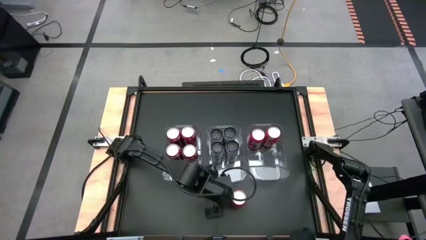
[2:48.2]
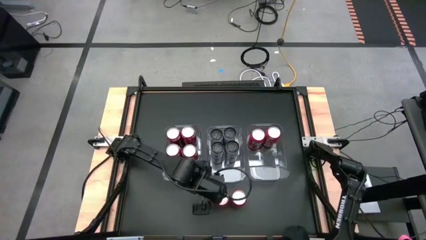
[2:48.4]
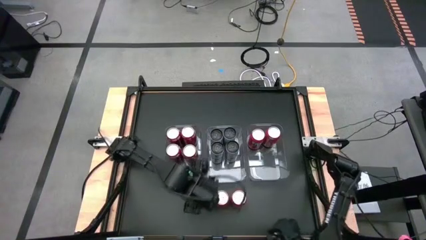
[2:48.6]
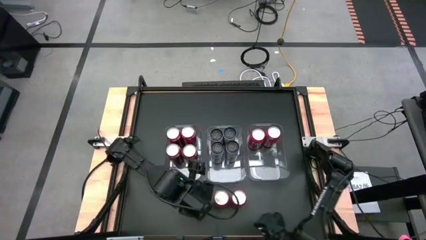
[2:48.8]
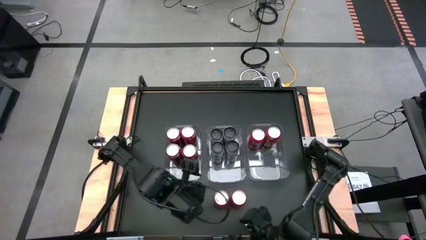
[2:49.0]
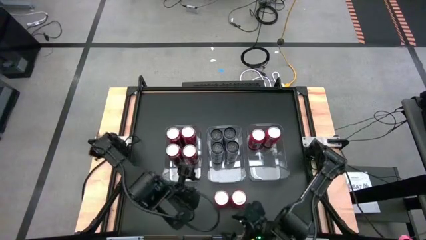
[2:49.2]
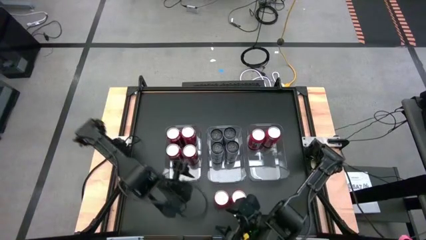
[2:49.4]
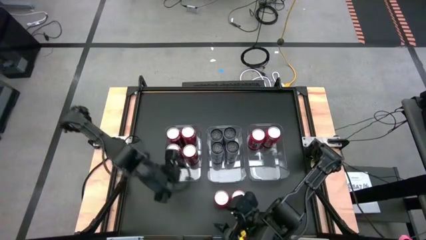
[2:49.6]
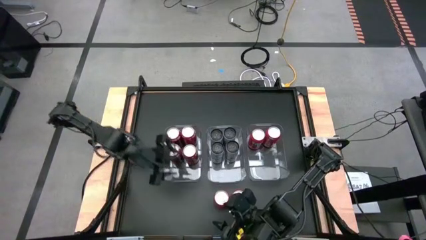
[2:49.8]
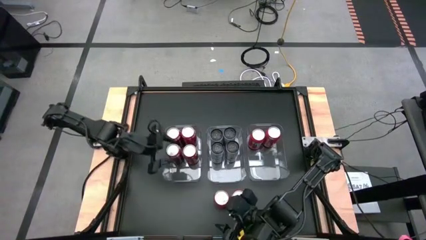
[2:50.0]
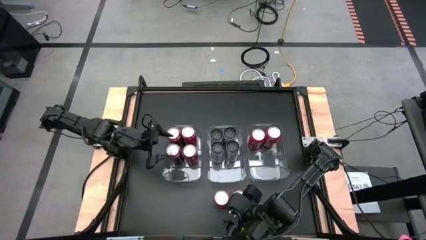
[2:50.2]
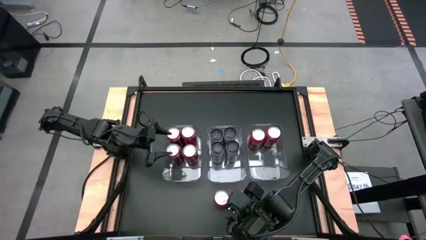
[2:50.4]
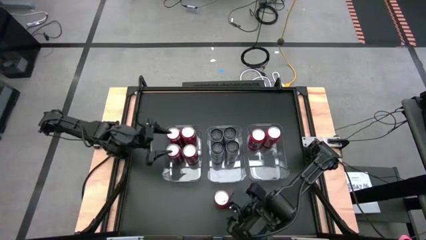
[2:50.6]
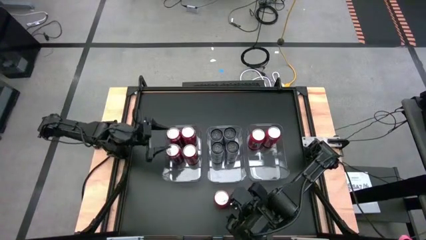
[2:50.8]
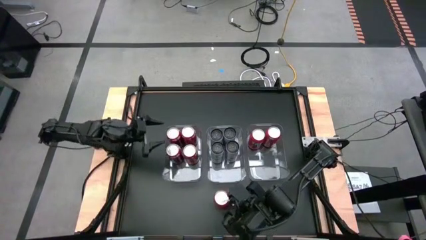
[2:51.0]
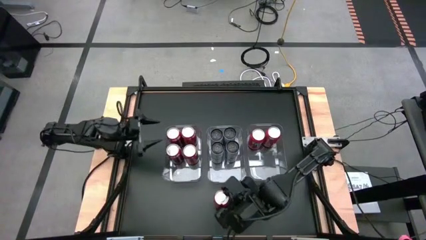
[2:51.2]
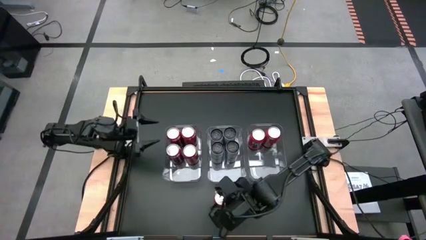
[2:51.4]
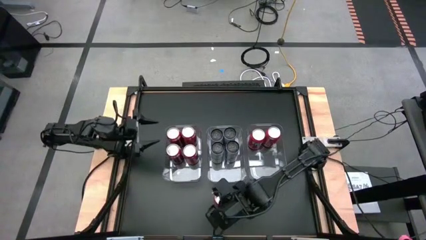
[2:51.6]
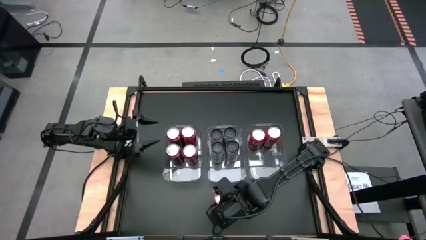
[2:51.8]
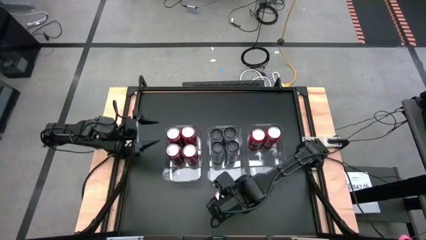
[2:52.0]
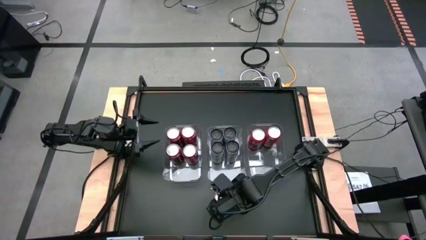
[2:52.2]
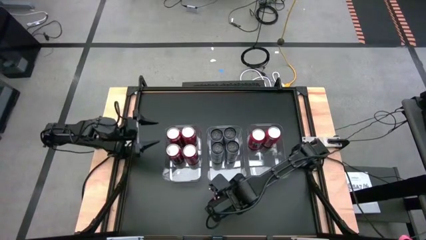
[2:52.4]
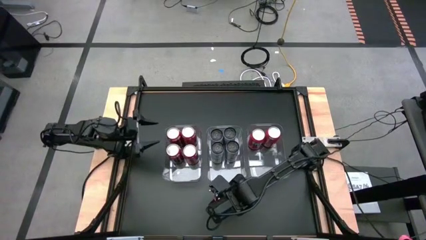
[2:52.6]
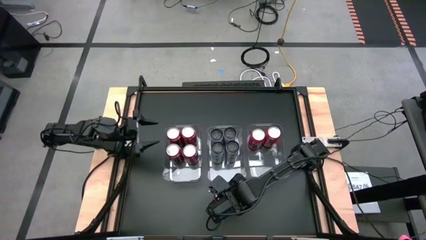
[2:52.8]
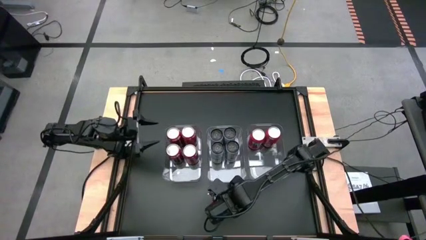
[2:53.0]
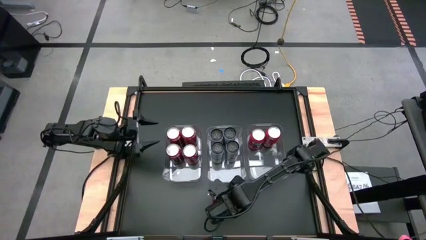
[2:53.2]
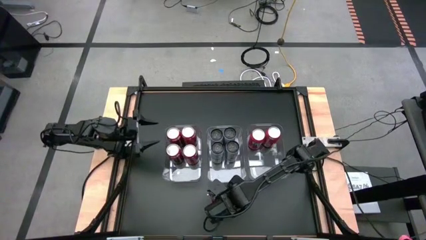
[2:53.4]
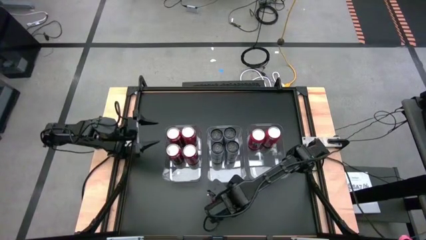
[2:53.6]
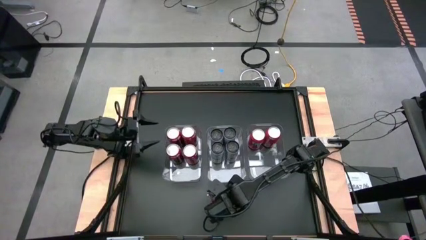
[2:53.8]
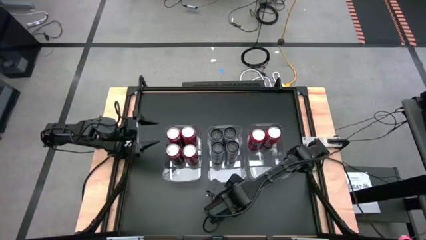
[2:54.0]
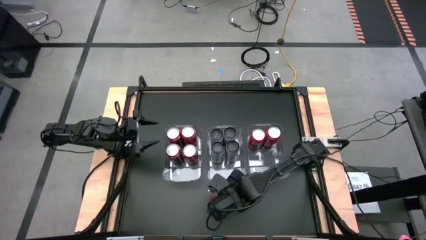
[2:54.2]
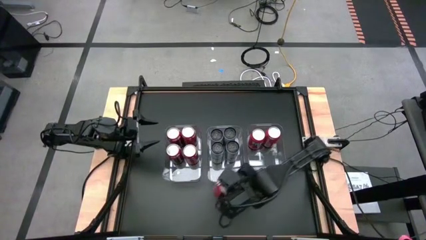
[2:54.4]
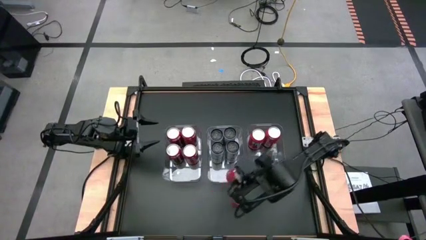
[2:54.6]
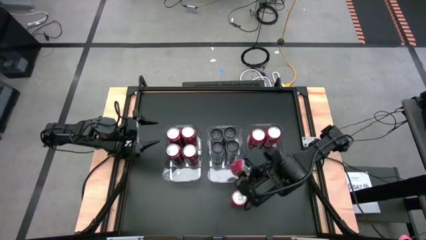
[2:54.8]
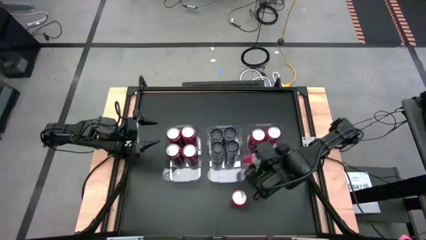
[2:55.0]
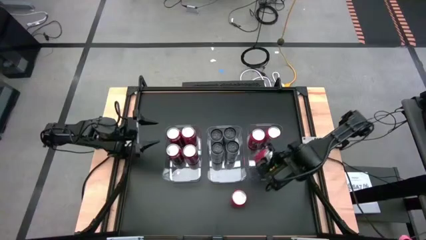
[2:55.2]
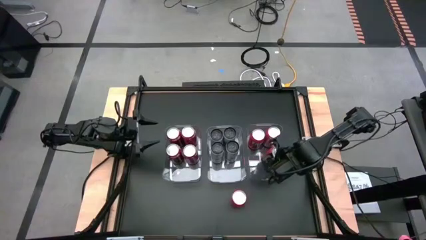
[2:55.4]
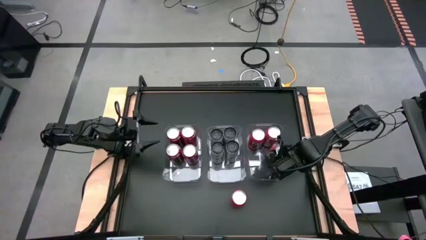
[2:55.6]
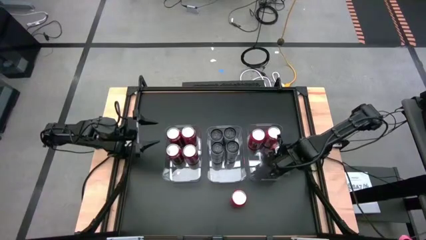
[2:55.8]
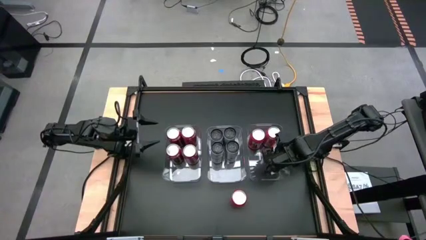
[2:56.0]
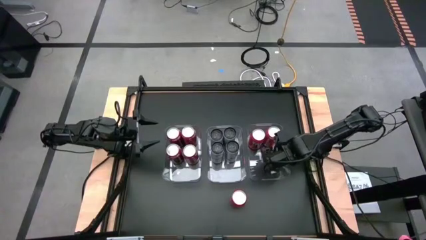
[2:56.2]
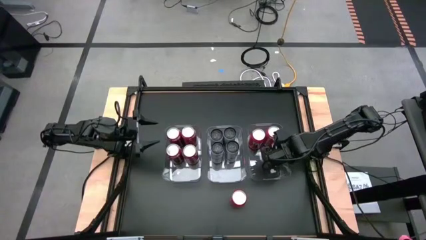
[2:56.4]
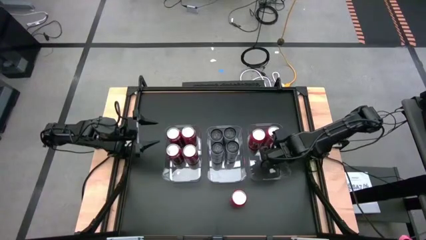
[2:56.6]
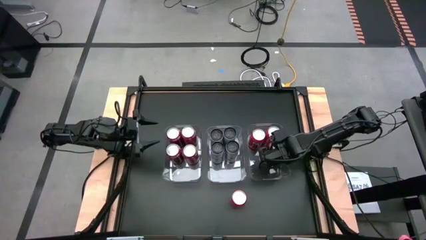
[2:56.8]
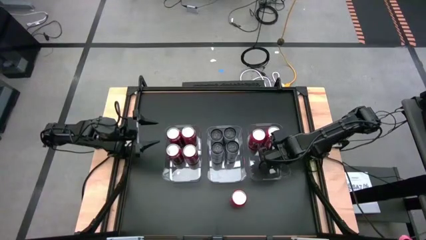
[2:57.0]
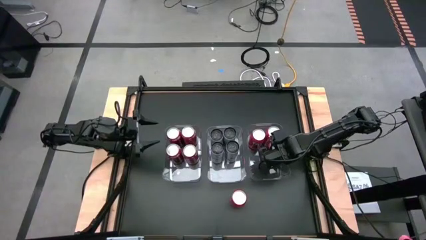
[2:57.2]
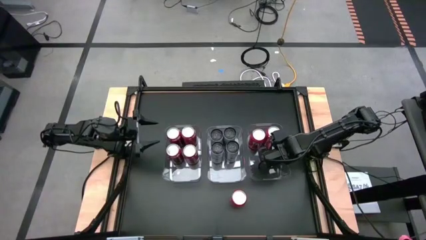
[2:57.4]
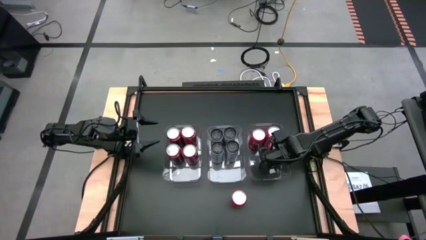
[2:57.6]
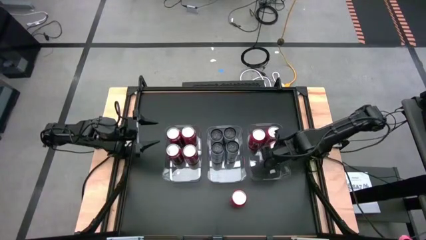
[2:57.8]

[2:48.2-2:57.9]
Task: Sort soda cans
Put the left orange soda can to the right transparent bin

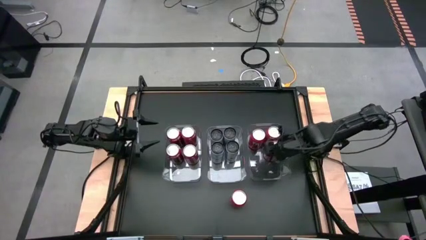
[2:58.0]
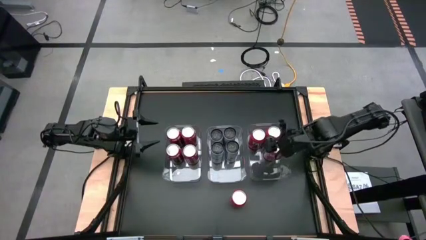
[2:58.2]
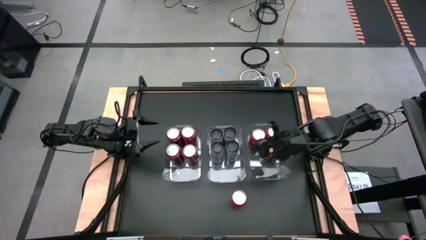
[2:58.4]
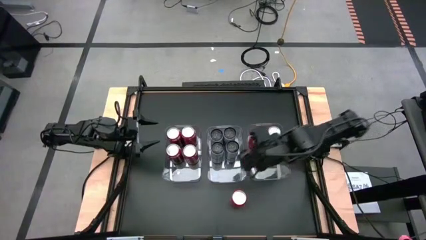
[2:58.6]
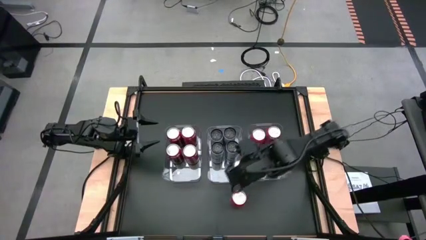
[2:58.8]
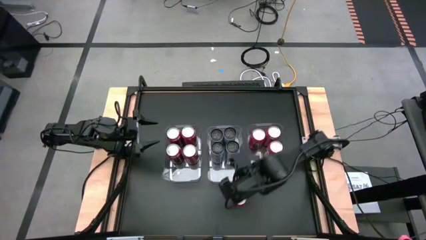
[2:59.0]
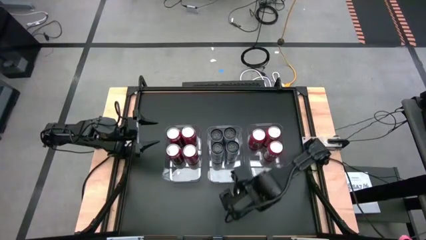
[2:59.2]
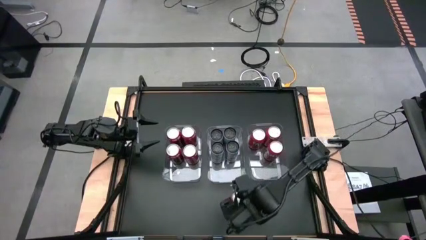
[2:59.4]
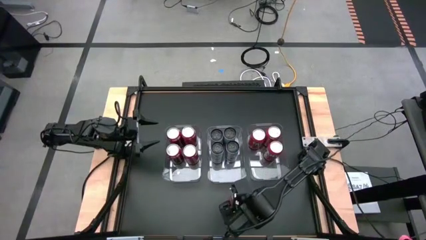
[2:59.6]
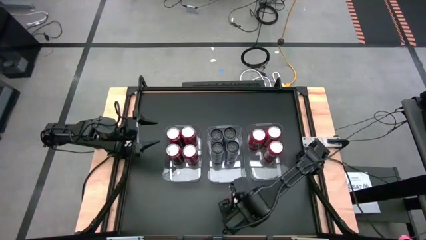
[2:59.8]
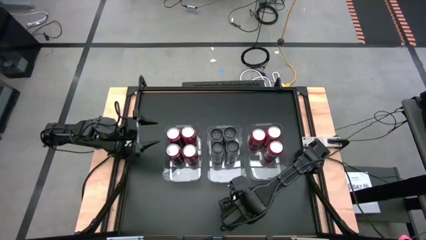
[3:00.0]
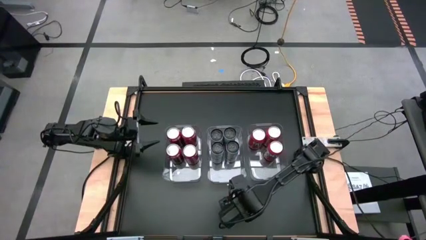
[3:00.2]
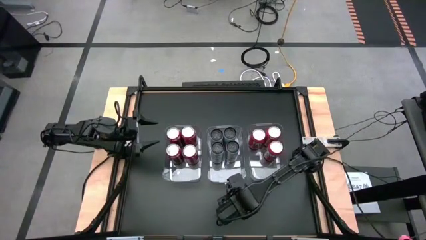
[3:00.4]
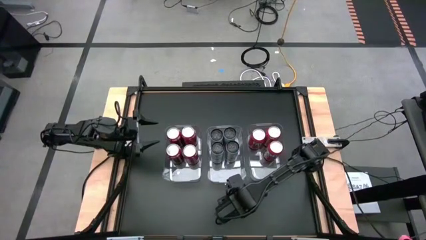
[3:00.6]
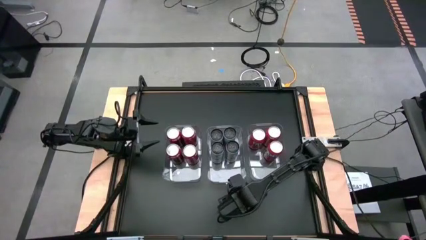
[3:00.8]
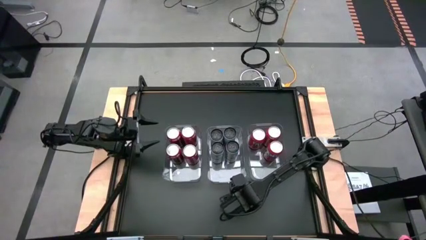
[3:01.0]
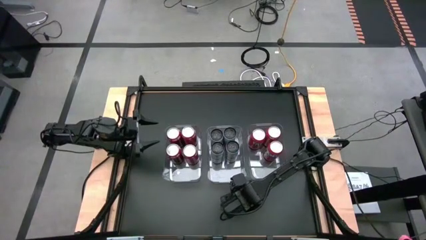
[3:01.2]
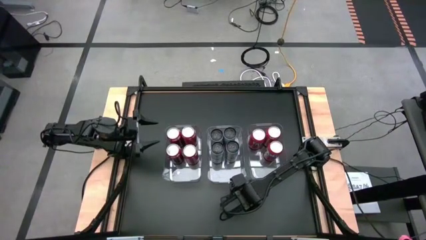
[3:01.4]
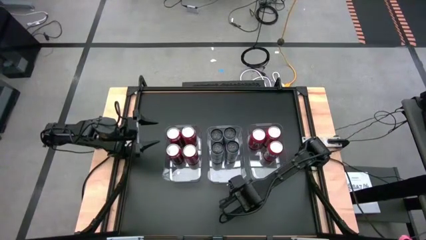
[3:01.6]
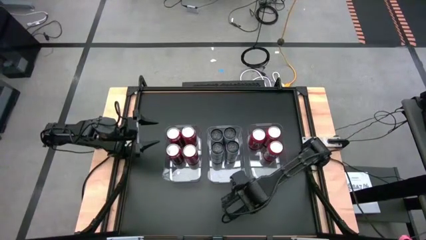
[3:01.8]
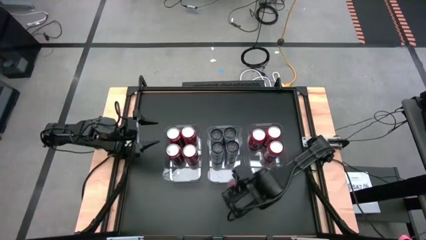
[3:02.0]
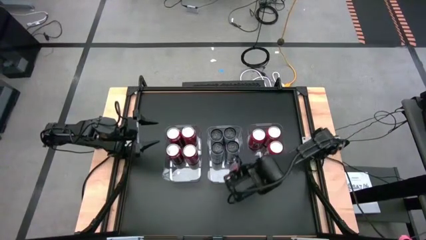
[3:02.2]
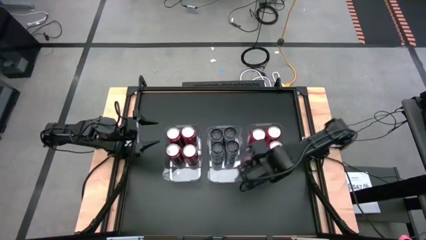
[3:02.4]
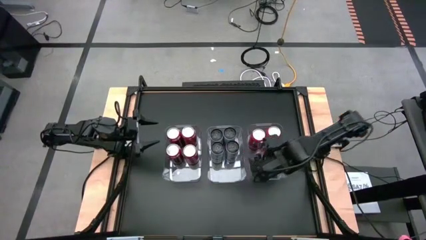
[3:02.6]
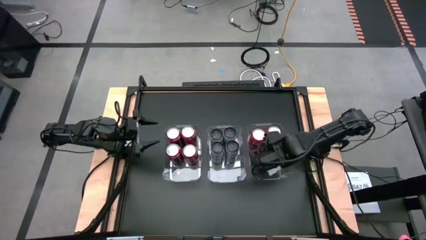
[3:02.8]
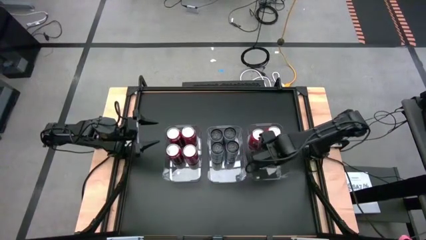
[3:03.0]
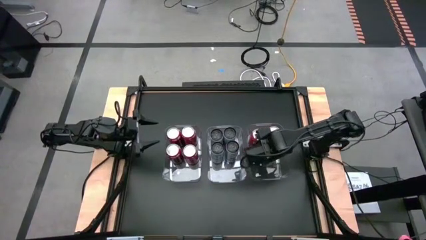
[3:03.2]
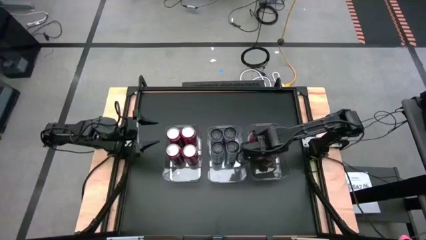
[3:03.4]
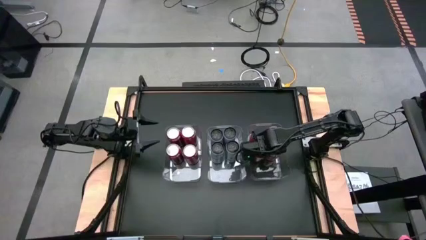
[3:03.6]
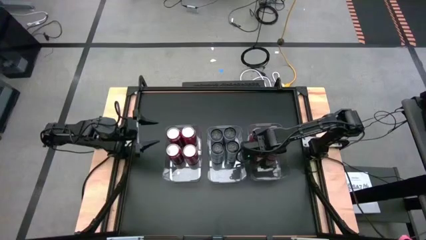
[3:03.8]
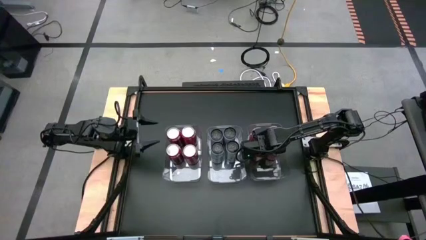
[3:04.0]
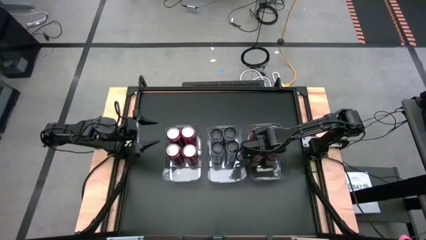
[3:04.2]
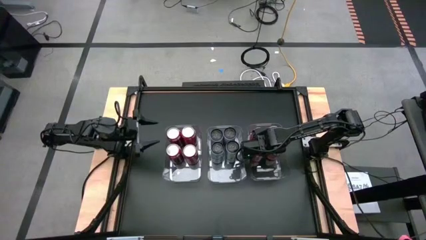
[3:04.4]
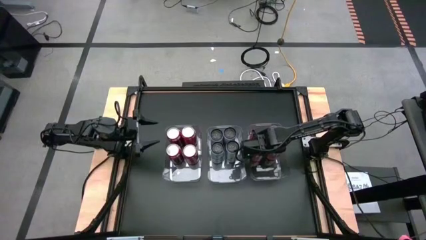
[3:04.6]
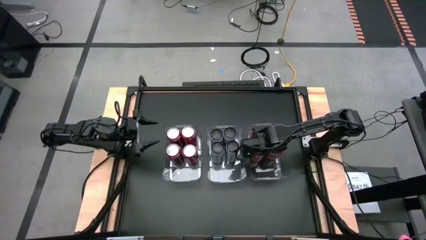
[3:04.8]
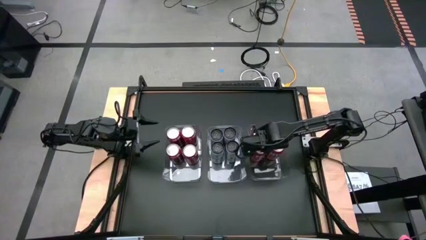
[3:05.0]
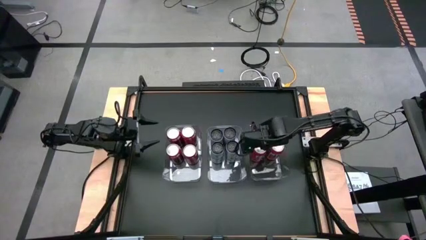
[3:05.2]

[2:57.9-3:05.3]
Put the orange soda can into the right transparent bin
